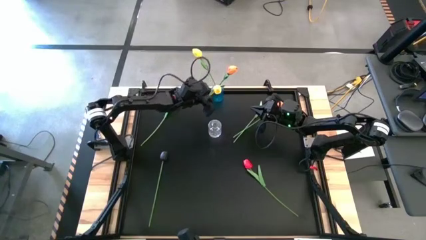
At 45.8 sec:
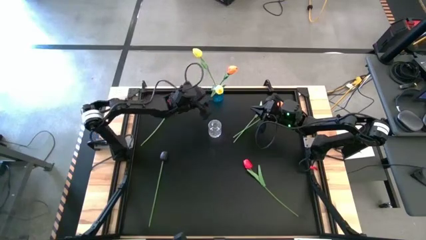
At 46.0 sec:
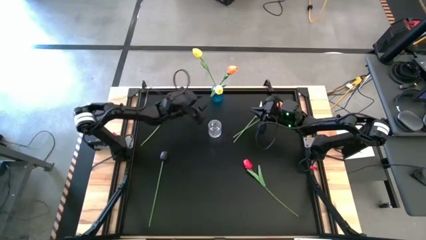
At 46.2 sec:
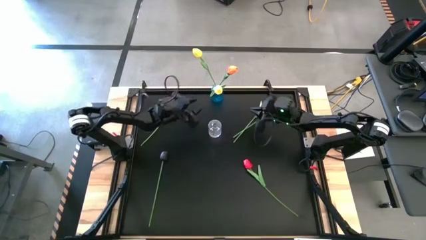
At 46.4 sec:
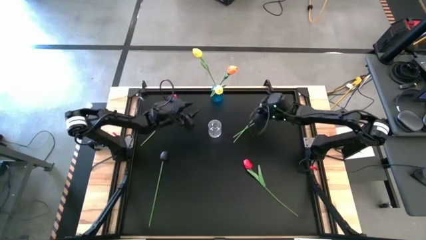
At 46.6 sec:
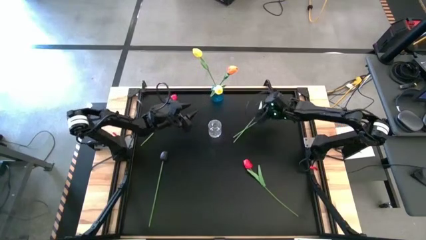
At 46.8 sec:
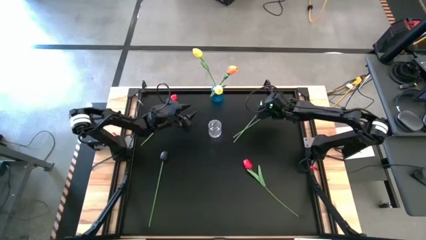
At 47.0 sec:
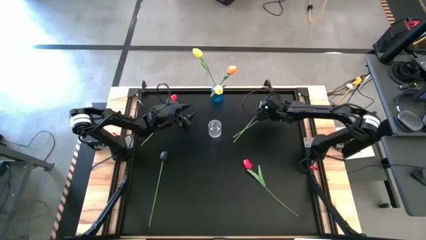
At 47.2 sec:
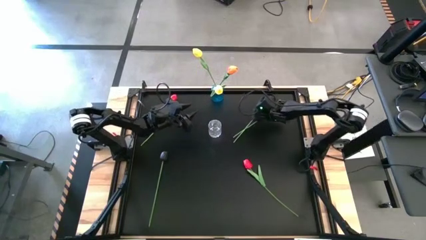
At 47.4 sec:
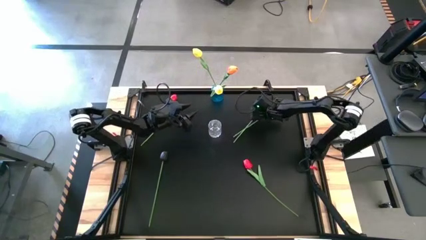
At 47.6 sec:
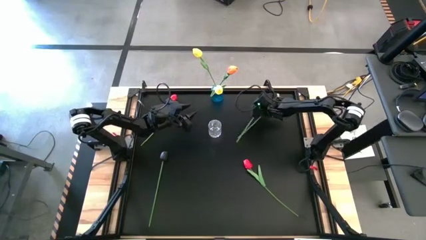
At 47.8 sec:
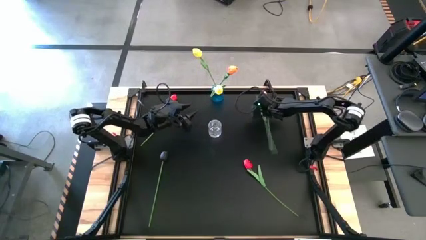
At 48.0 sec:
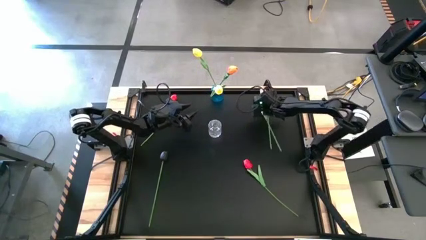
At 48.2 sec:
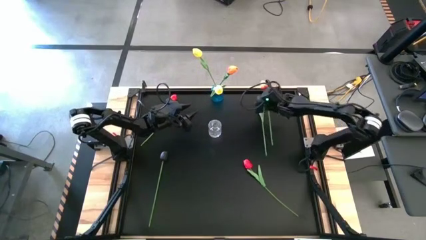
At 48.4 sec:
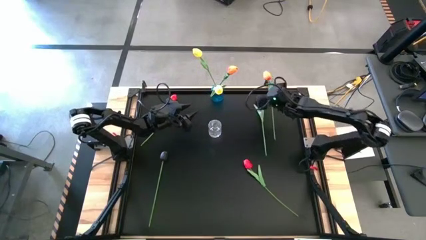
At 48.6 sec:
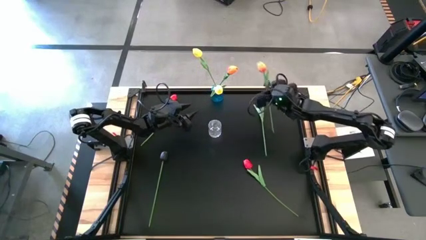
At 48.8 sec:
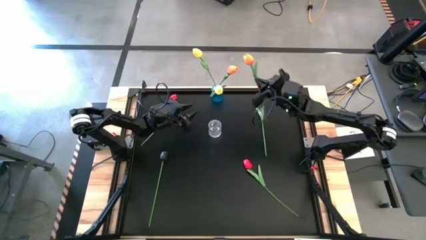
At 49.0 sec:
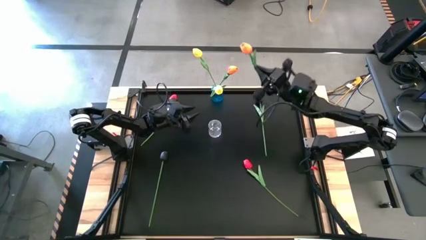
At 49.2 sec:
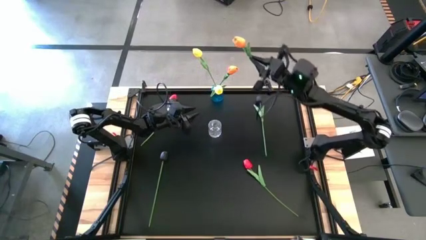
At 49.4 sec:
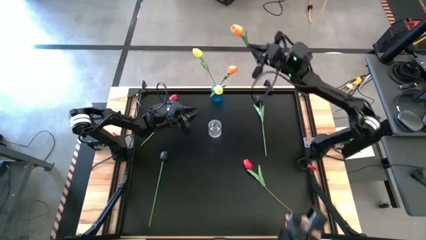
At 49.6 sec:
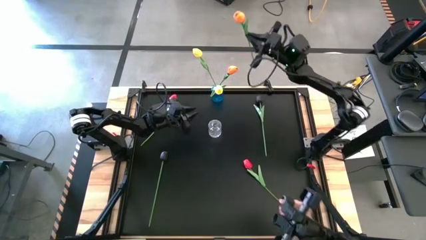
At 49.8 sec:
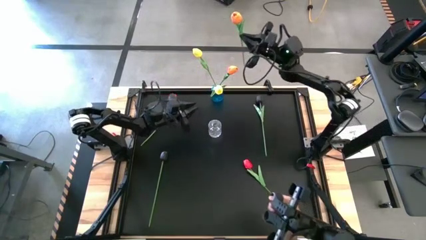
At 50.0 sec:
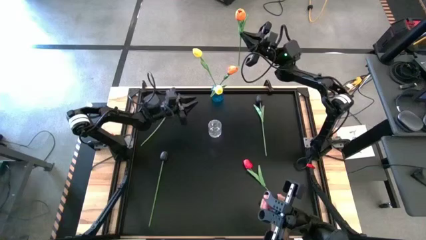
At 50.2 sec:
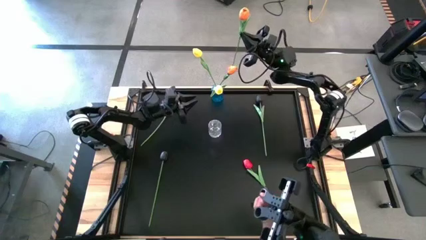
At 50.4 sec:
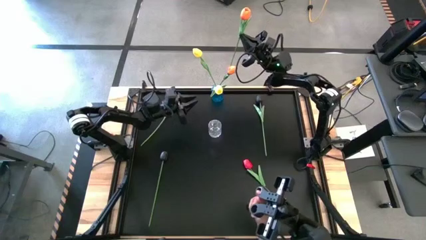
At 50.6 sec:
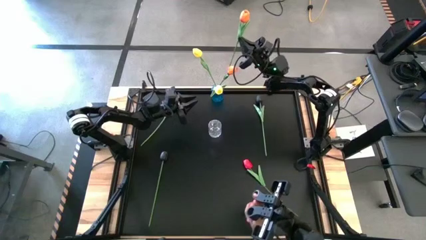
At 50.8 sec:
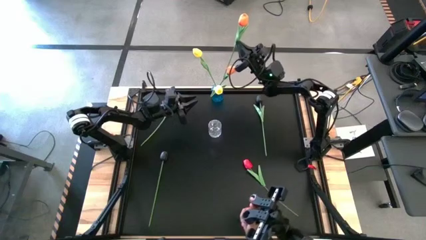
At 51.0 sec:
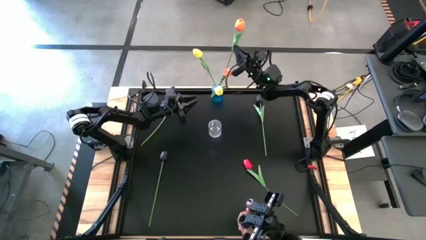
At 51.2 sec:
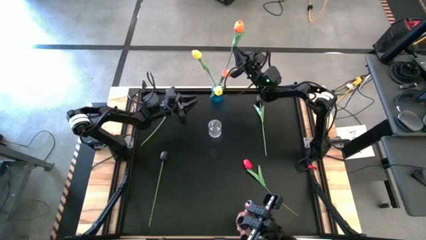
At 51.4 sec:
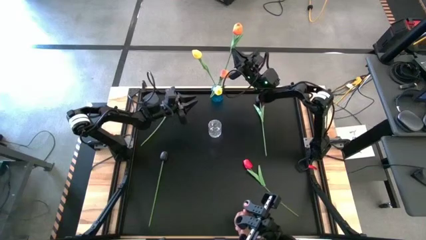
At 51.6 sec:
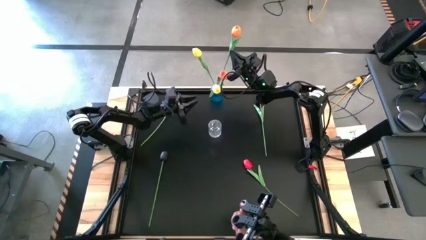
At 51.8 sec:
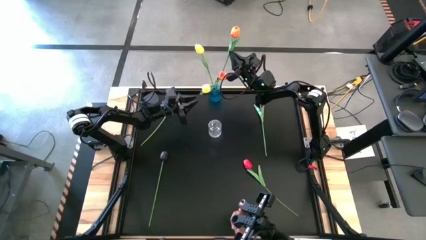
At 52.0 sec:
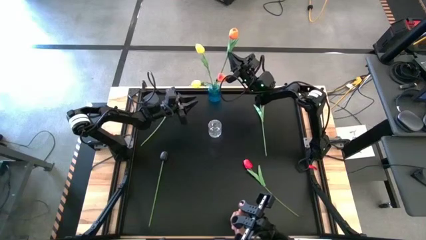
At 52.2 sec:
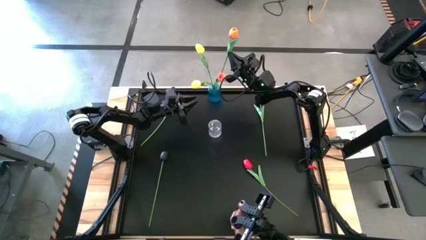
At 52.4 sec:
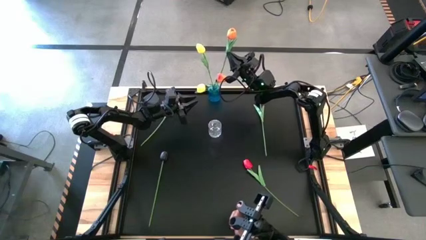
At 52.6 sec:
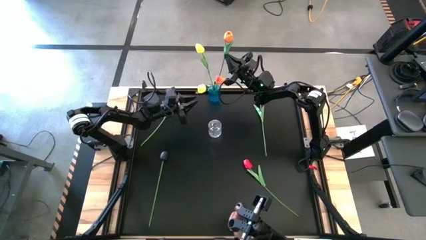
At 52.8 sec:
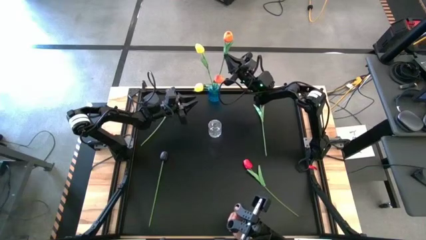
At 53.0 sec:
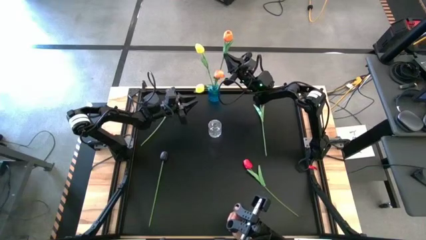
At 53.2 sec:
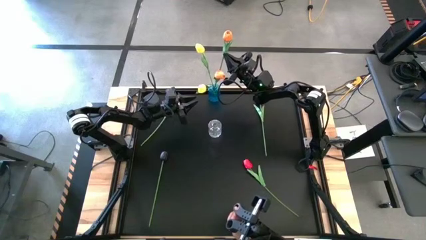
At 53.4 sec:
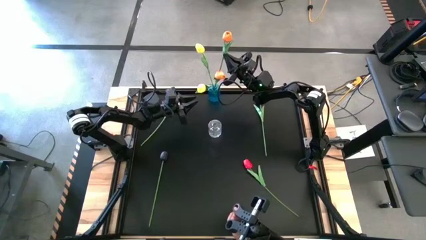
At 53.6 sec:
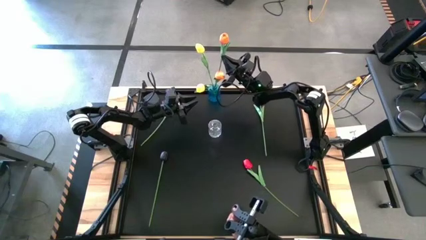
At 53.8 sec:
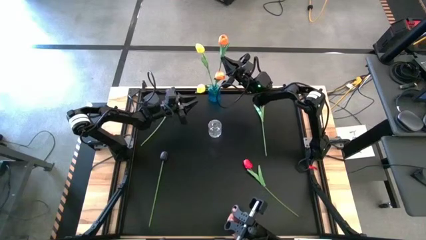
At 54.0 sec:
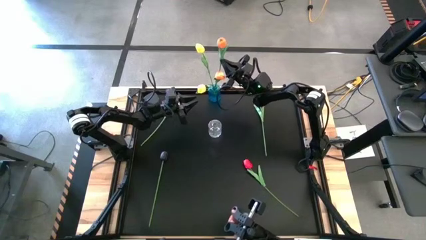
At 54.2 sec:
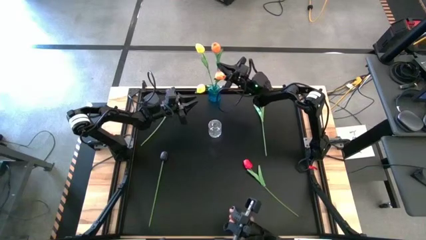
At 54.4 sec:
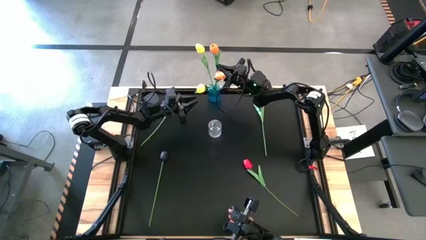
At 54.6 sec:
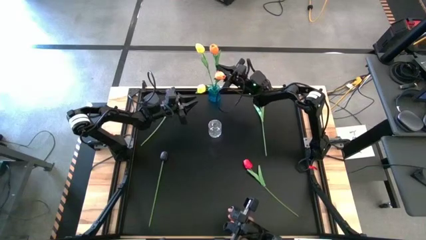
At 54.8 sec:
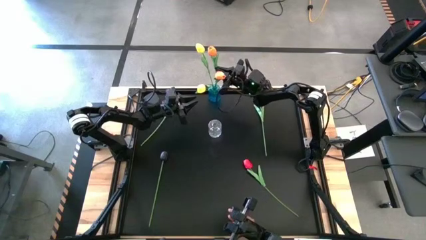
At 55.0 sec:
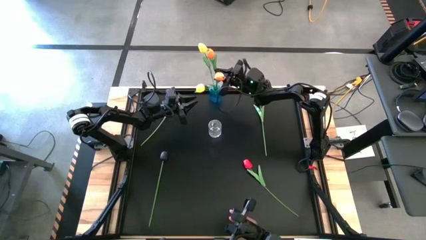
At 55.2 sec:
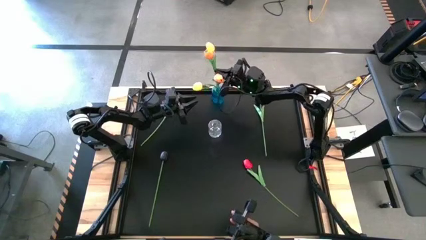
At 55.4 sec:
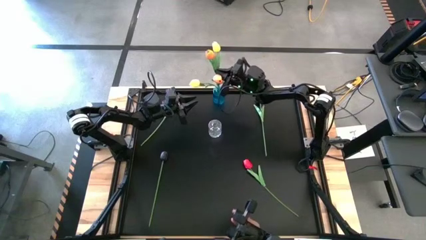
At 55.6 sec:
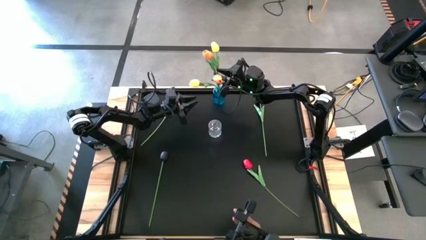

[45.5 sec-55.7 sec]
Task: Sort flowers into vase by color
Put the orange tulip into the blue vase

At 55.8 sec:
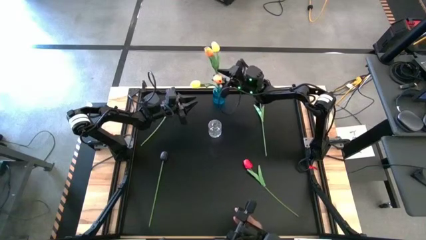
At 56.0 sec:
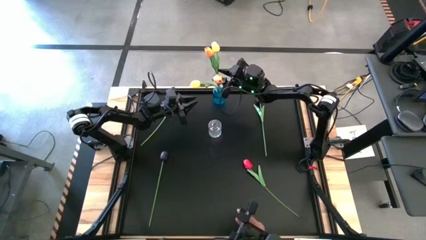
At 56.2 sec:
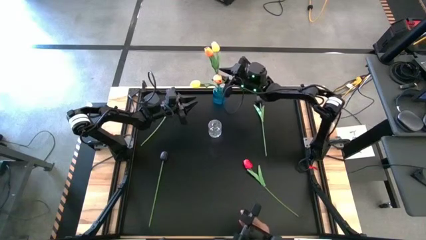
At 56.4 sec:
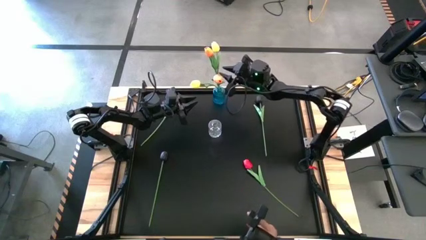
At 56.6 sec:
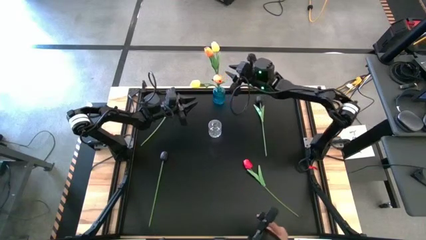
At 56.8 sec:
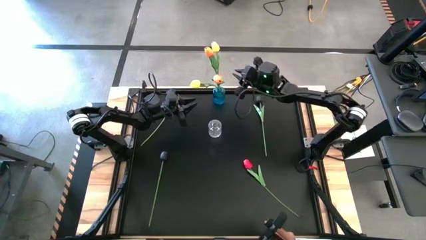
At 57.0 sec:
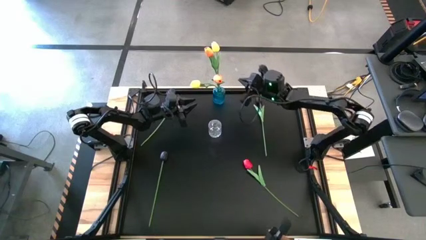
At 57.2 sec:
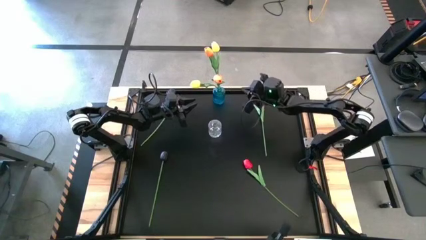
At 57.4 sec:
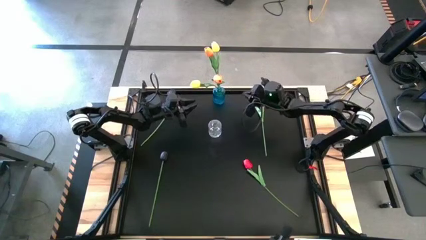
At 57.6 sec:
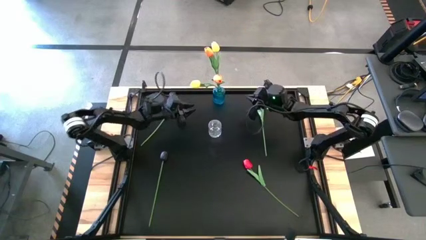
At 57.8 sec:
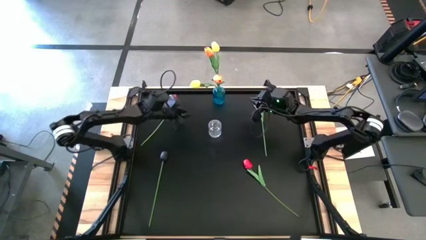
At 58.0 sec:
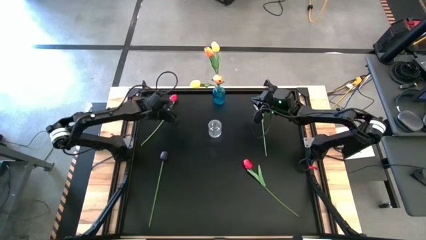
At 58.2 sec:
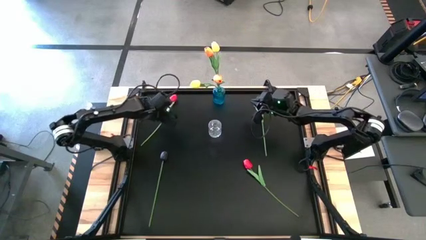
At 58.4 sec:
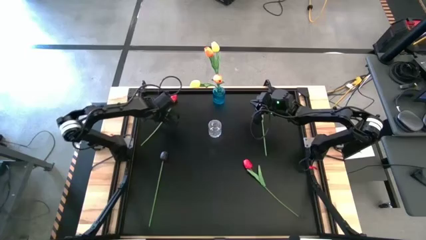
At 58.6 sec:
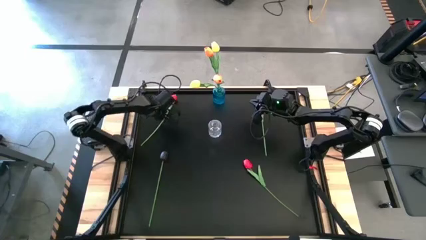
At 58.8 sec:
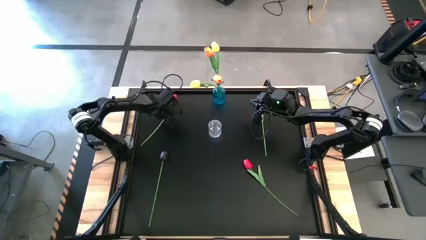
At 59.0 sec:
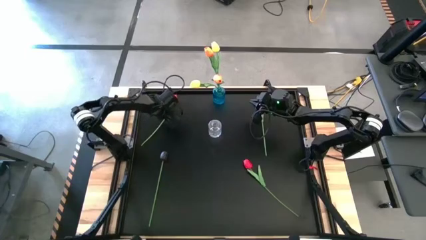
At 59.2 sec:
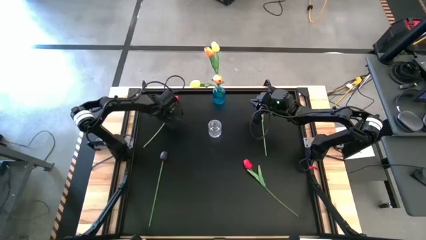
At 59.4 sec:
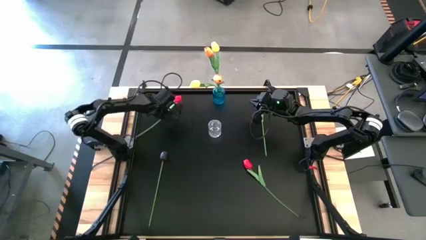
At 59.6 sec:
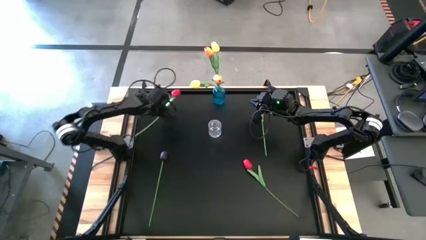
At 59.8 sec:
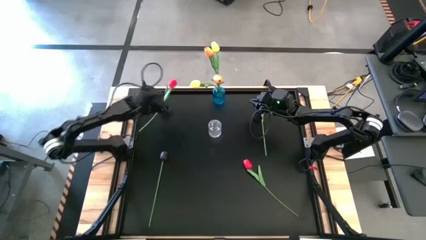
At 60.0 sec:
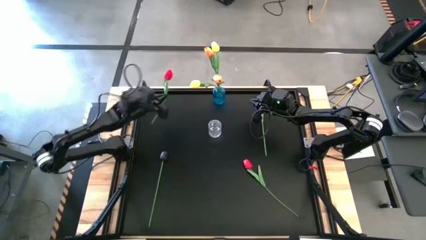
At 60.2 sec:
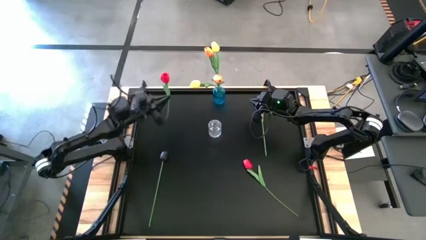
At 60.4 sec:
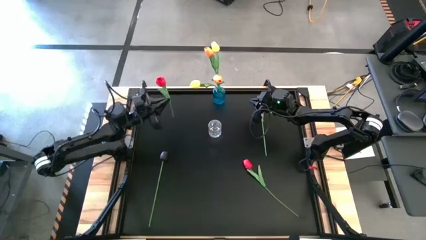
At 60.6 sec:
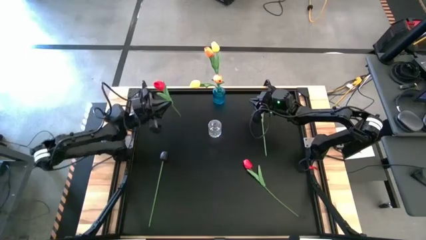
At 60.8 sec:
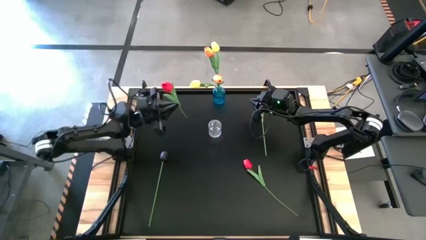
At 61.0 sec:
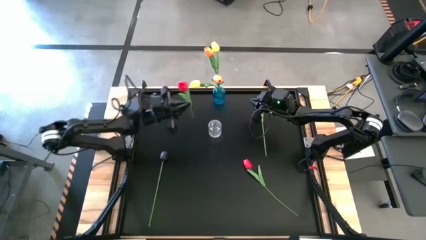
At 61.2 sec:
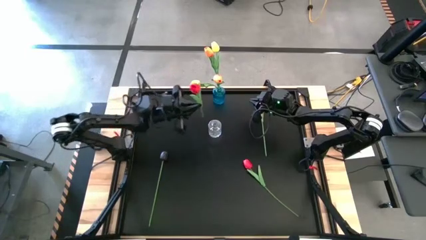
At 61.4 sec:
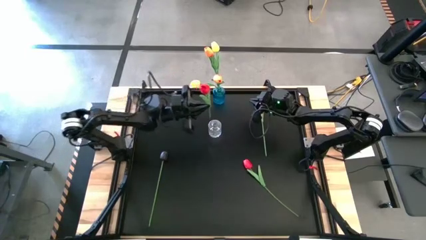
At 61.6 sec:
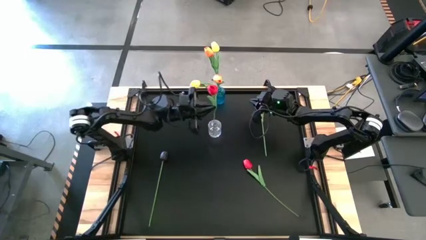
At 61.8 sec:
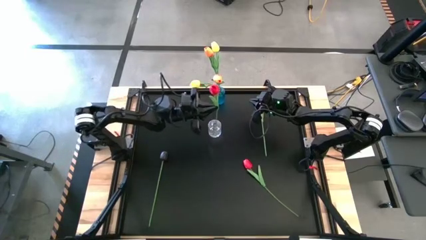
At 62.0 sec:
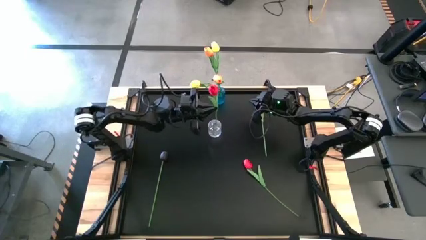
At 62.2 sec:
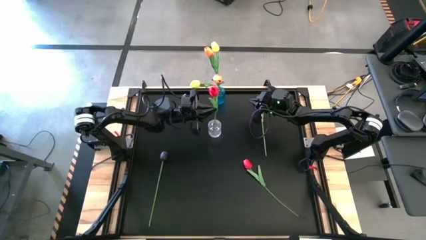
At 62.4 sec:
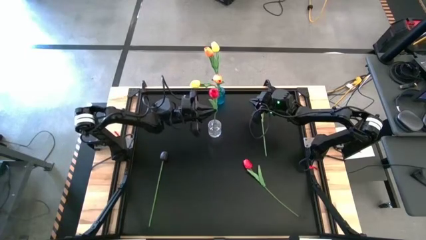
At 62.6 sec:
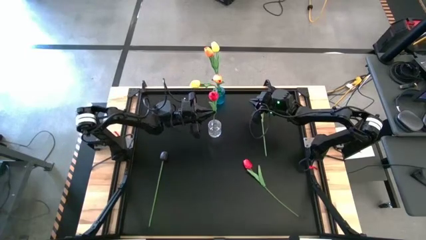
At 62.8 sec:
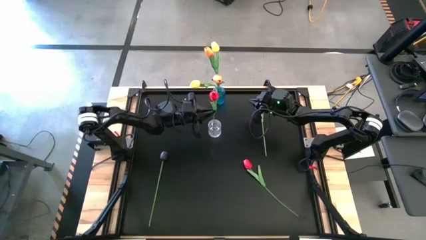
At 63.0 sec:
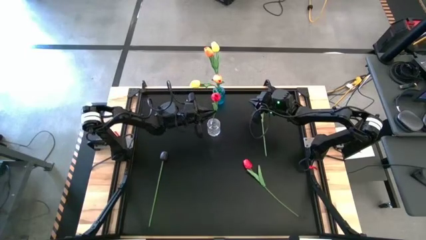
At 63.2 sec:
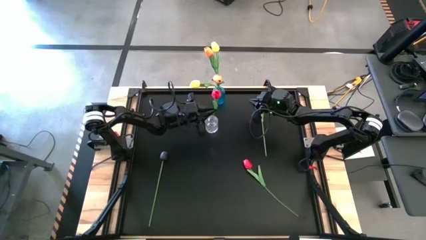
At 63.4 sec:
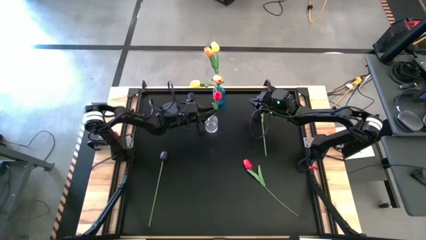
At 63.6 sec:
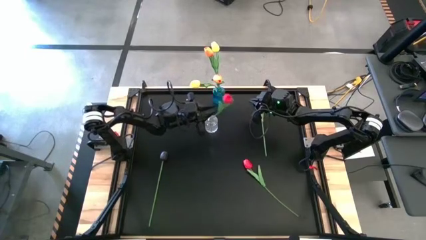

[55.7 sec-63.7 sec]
Put the left red tulip into the transparent vase
